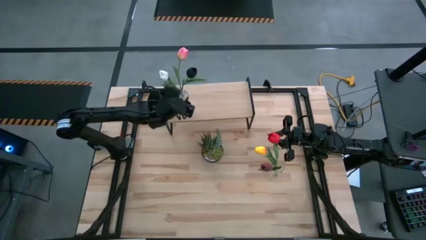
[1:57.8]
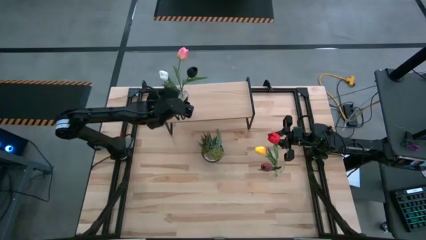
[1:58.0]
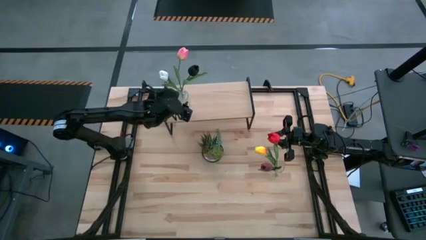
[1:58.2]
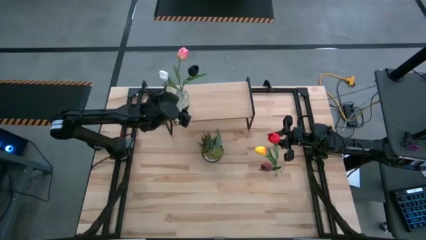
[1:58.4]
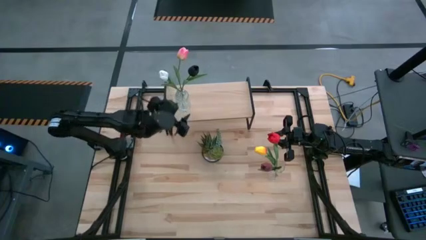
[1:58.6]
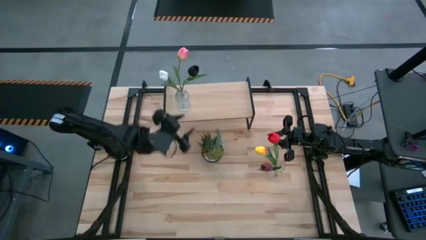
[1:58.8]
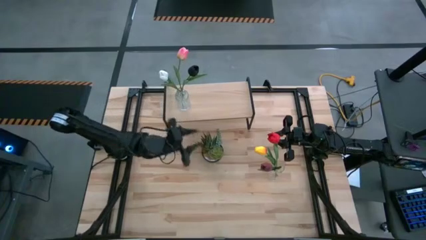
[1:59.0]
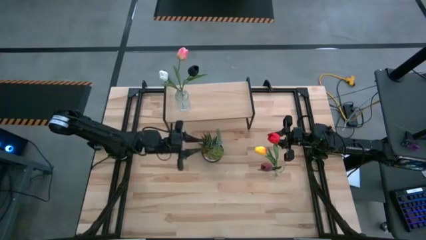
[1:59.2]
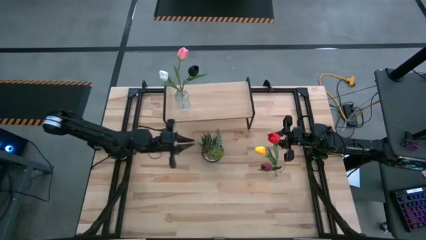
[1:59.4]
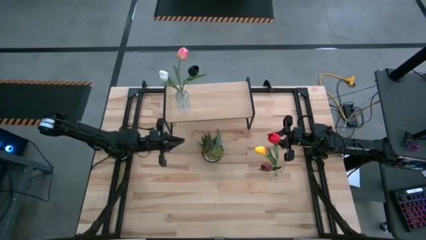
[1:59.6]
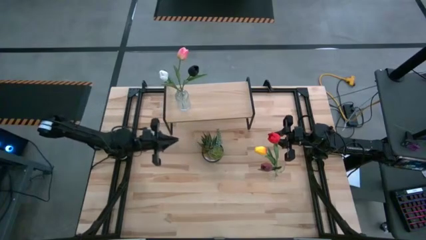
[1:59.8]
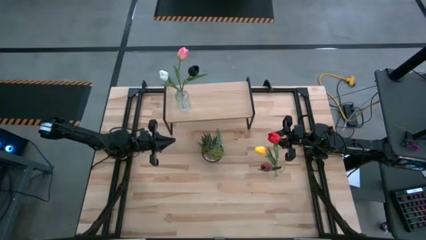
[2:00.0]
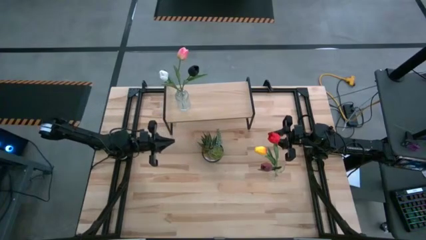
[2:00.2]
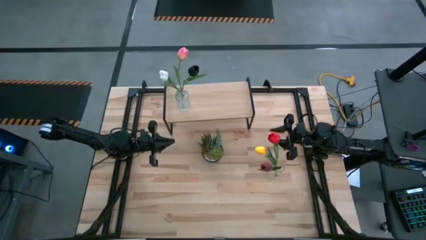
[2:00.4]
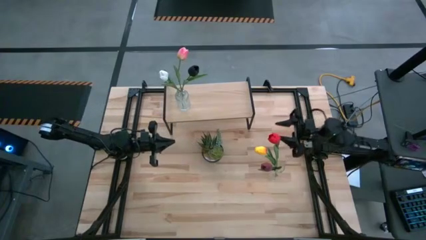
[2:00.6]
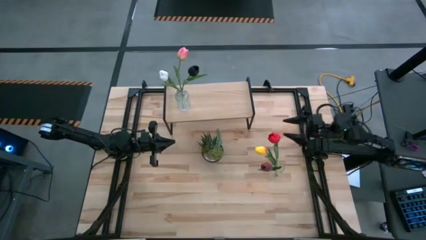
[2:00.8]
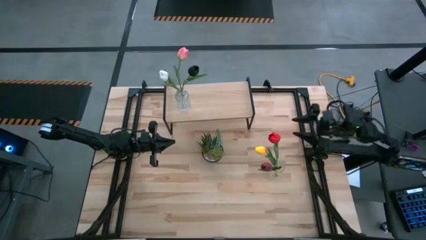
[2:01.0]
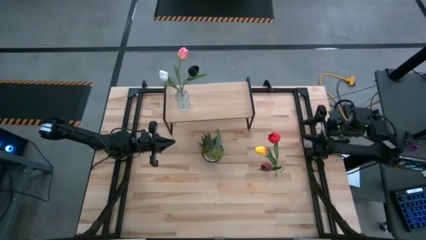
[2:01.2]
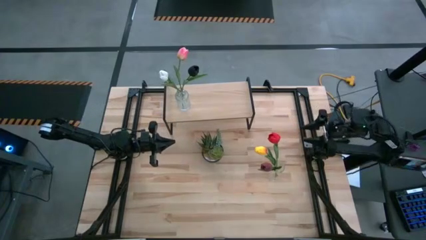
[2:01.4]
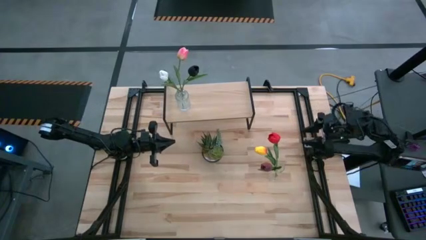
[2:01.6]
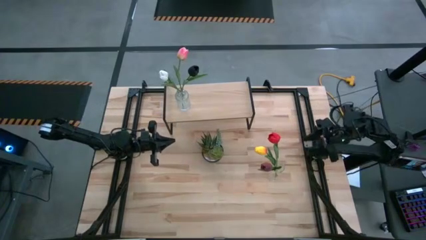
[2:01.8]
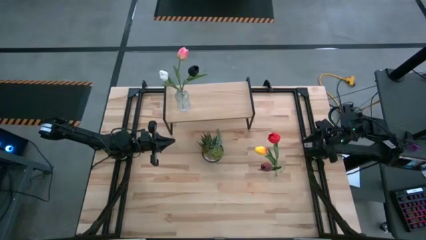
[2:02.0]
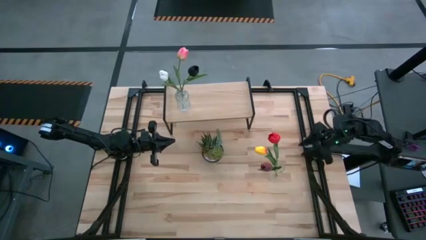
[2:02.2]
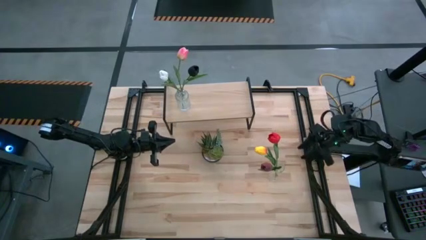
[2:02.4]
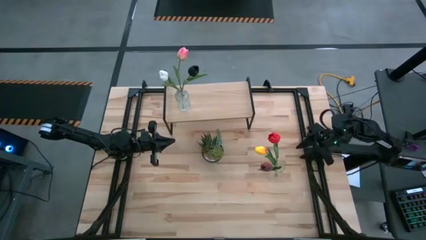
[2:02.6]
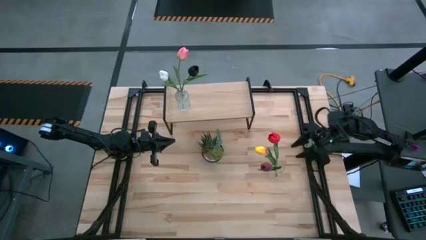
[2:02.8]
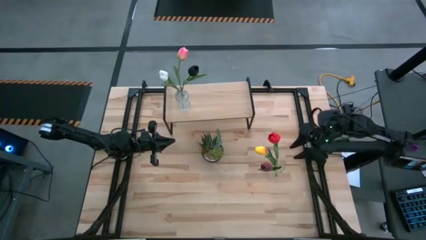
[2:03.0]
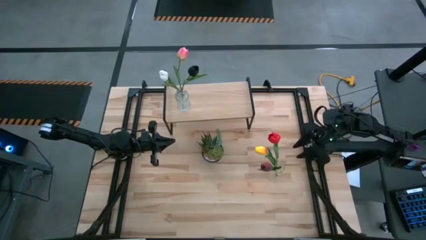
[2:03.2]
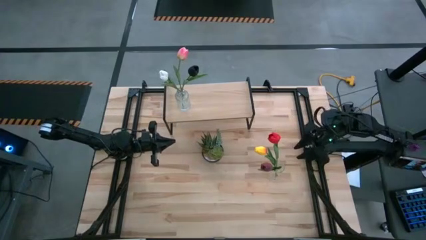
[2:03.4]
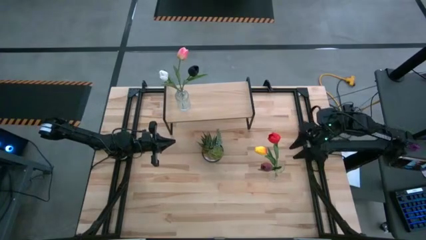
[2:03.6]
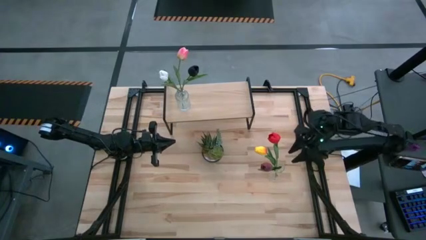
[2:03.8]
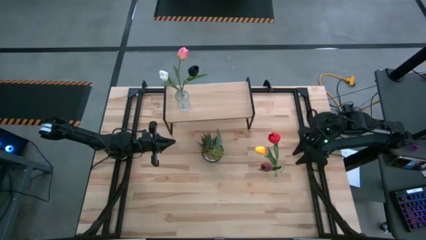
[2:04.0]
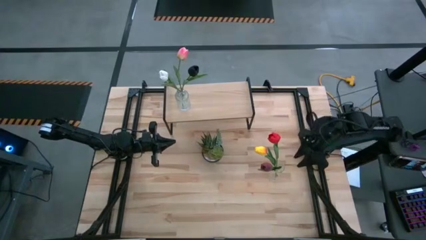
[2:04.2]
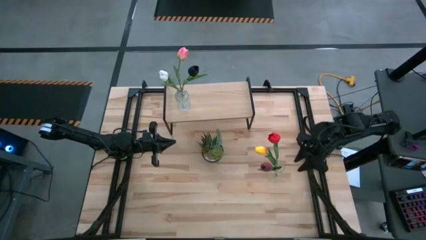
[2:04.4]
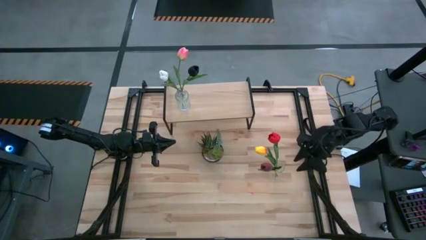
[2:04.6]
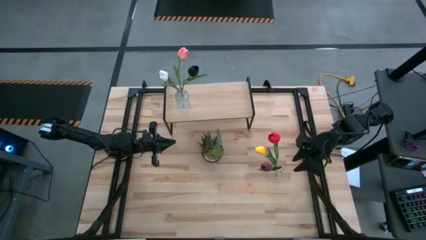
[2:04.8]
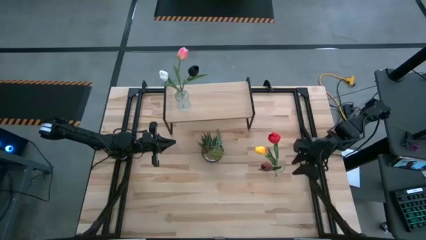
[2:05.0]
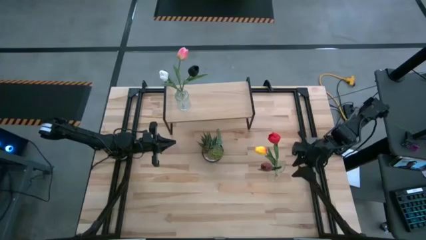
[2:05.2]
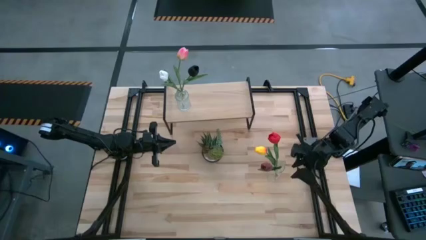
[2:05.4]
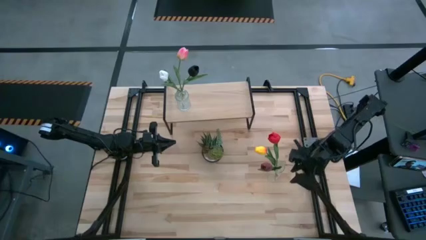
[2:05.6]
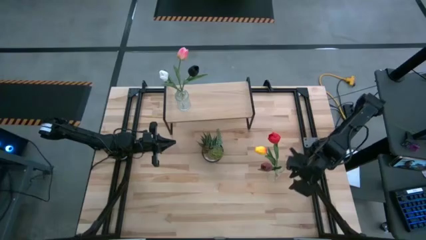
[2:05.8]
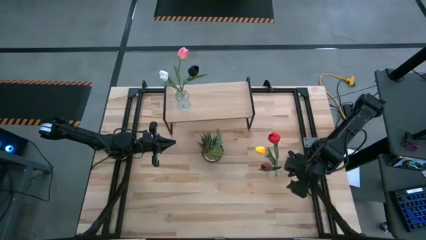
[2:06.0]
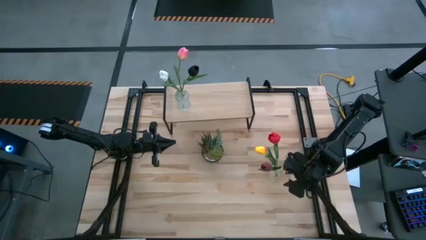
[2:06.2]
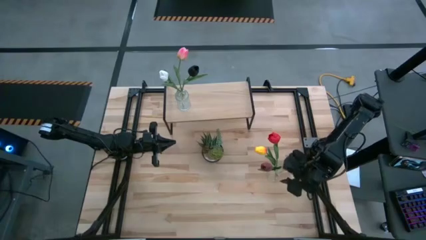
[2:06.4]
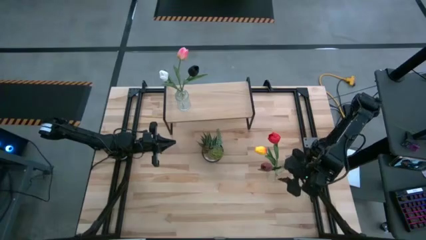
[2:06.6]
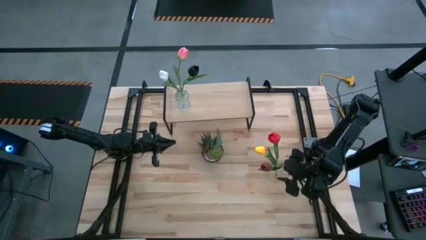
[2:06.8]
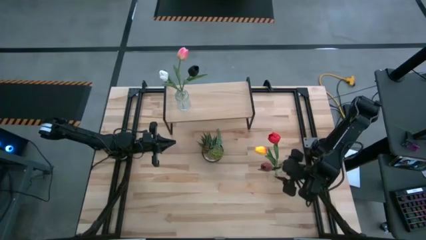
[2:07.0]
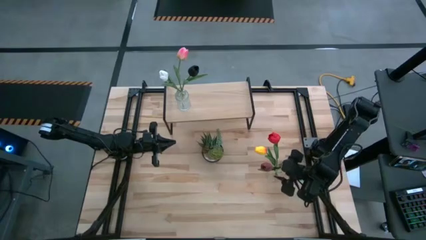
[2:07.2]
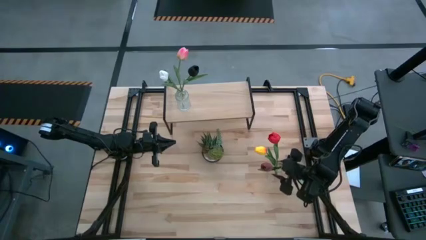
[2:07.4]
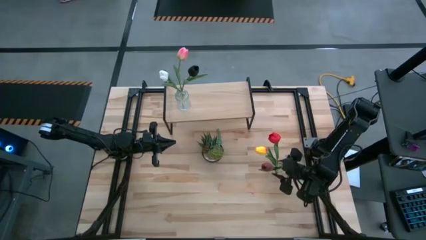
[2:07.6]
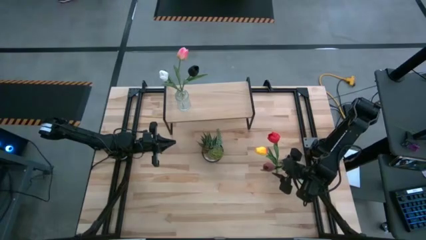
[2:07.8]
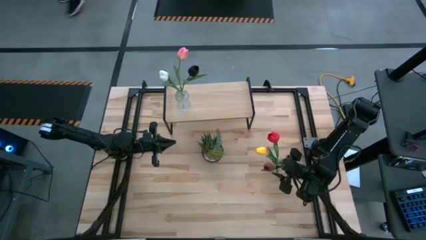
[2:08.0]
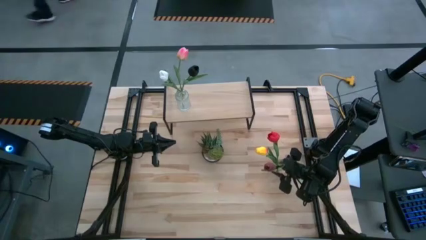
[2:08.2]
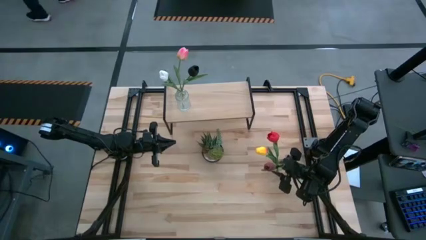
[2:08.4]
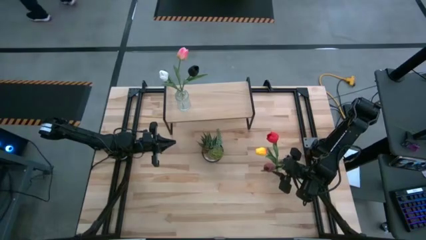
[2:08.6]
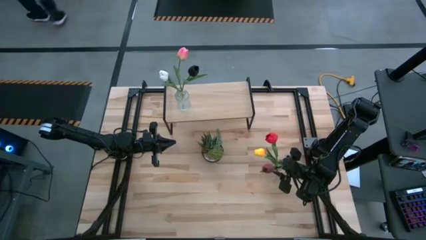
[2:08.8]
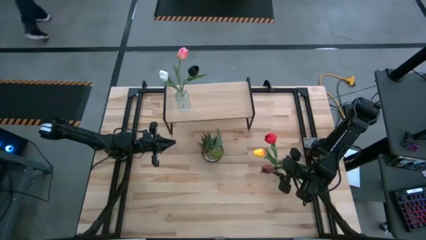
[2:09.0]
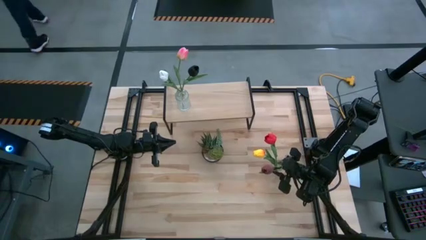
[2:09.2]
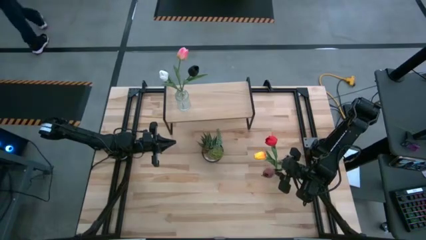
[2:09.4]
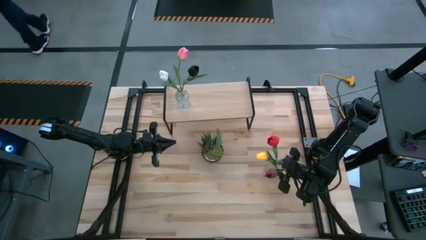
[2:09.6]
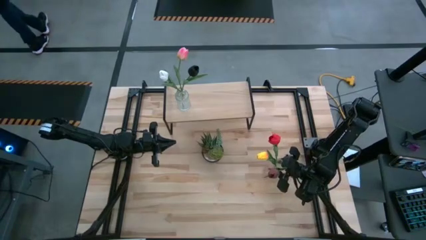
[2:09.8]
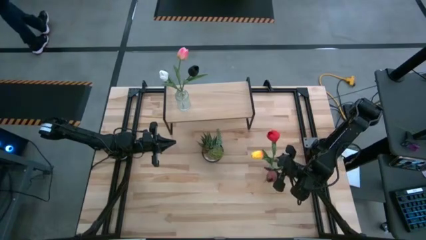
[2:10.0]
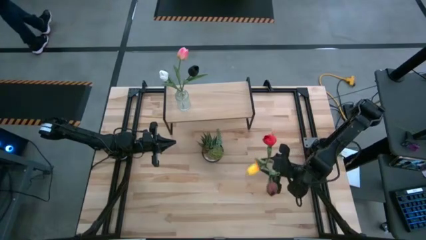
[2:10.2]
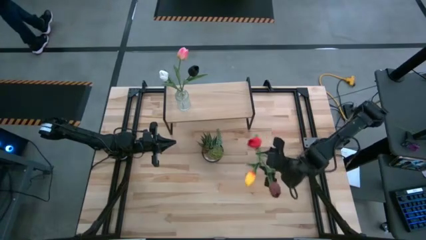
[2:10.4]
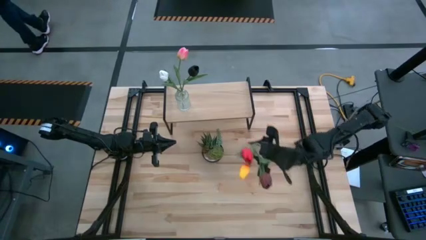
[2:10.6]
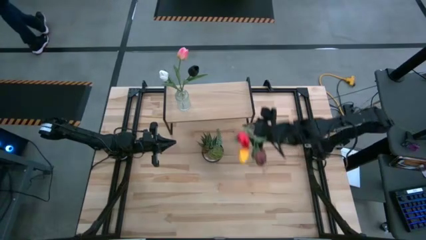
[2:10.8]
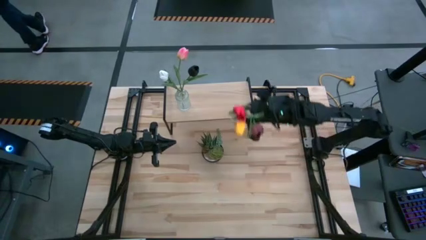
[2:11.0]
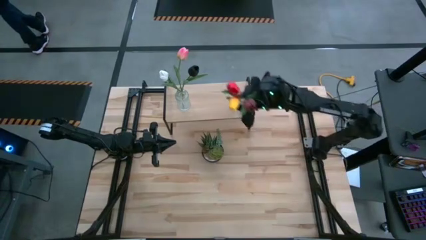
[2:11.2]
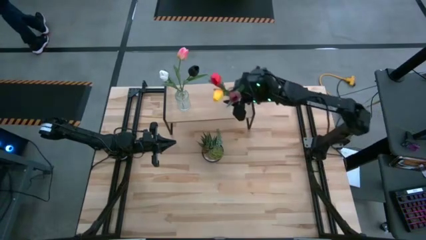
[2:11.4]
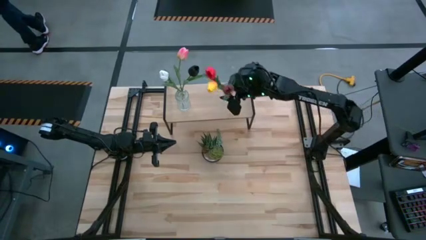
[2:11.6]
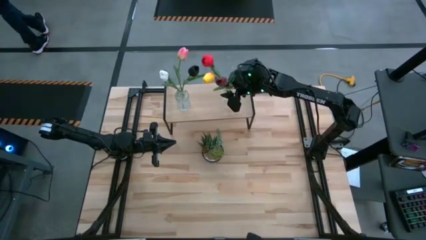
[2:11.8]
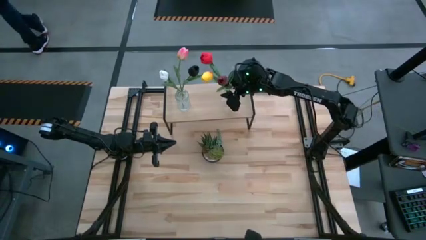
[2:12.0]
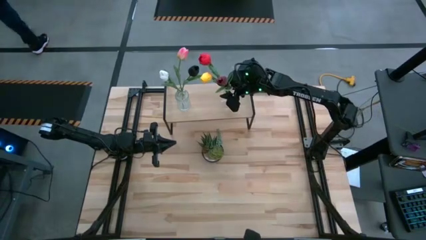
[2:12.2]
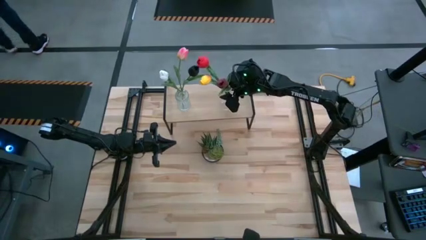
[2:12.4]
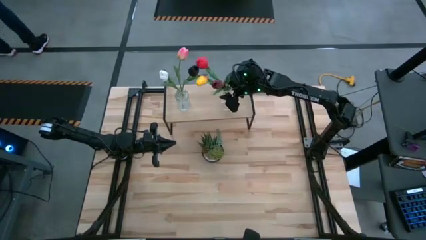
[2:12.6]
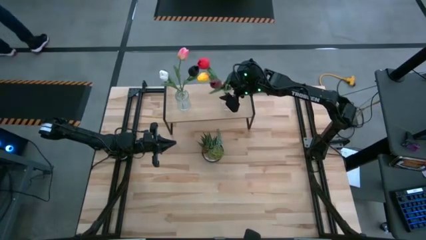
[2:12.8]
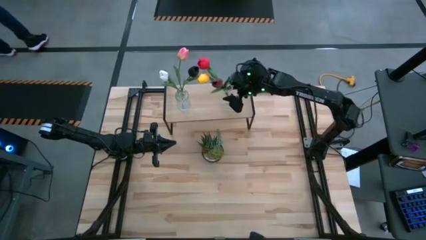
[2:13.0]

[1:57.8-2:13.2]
Task: Pick and place flowers into a vace then onto a shelf
Put the transparent vase with the flowers on the shelf
